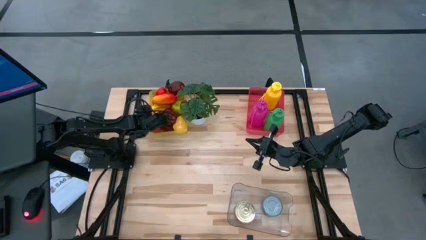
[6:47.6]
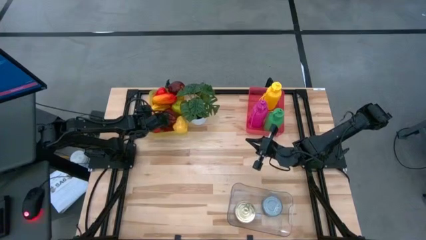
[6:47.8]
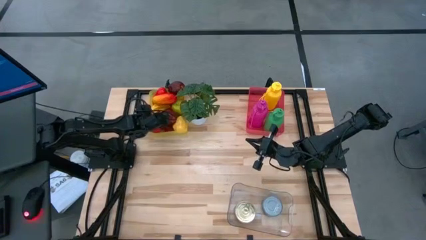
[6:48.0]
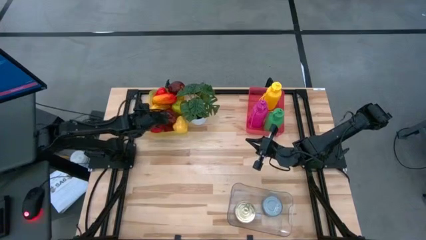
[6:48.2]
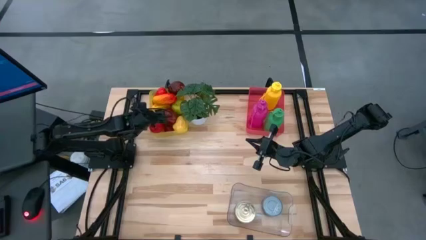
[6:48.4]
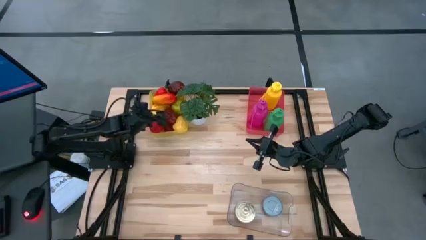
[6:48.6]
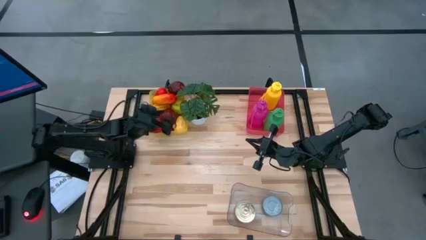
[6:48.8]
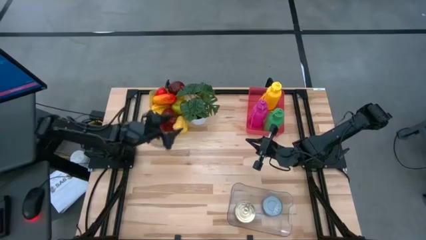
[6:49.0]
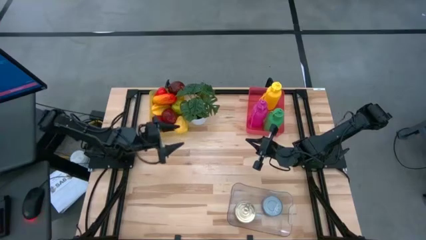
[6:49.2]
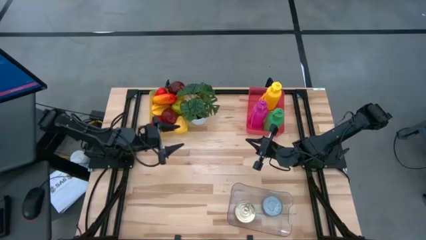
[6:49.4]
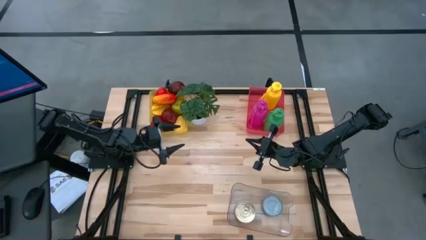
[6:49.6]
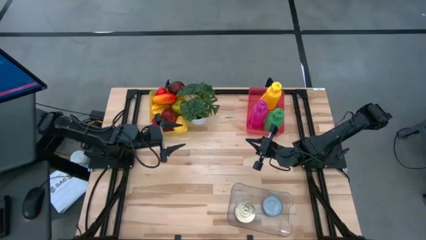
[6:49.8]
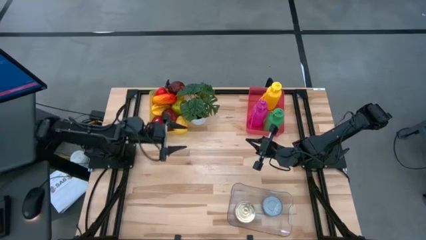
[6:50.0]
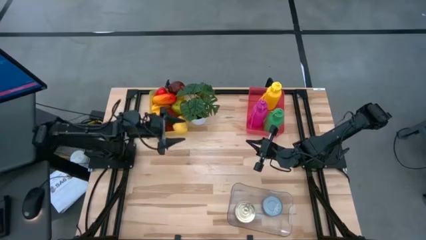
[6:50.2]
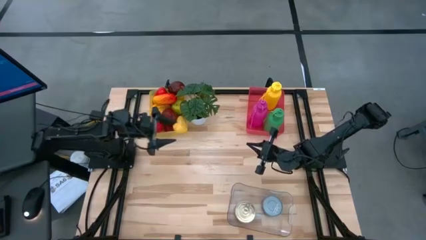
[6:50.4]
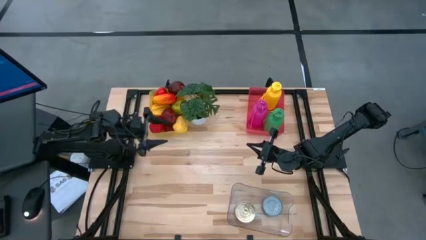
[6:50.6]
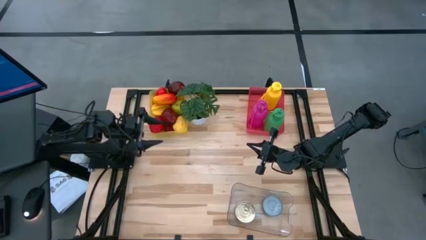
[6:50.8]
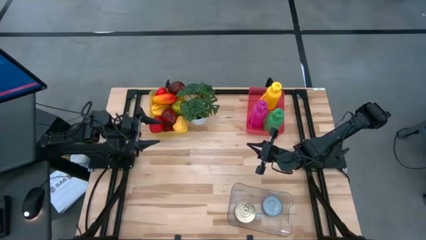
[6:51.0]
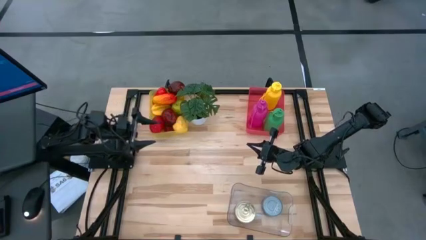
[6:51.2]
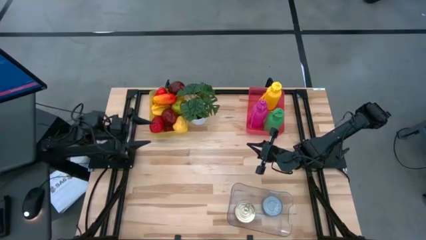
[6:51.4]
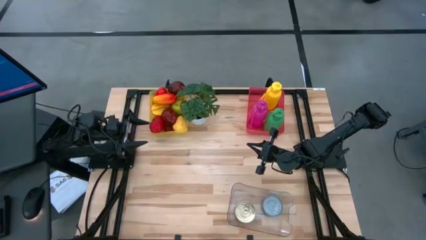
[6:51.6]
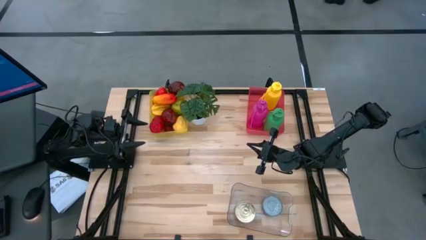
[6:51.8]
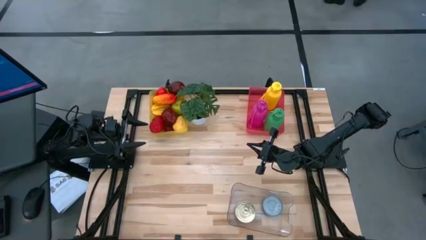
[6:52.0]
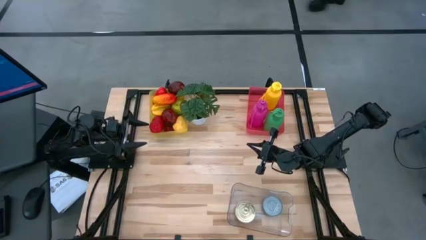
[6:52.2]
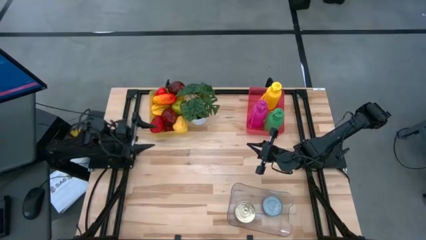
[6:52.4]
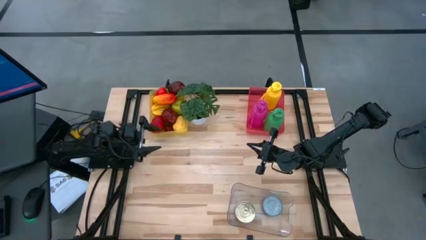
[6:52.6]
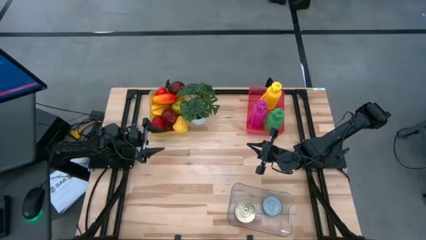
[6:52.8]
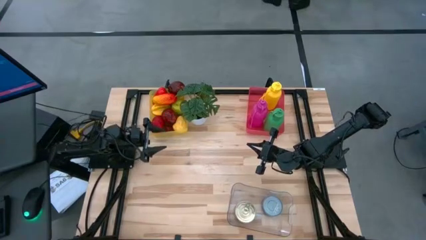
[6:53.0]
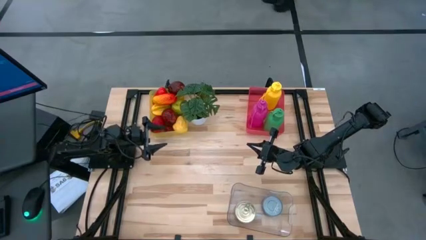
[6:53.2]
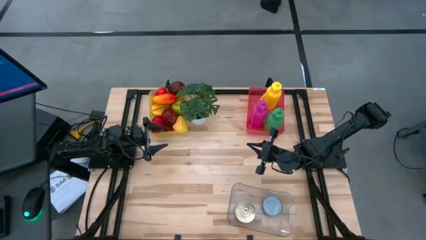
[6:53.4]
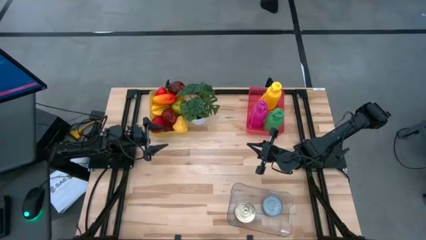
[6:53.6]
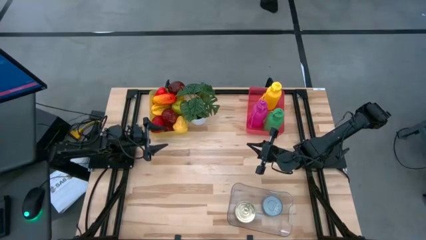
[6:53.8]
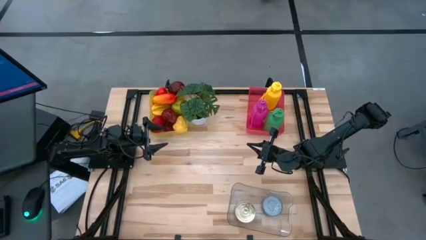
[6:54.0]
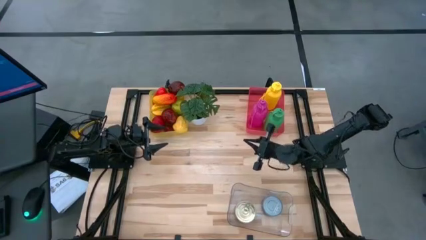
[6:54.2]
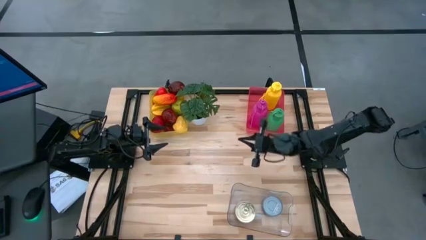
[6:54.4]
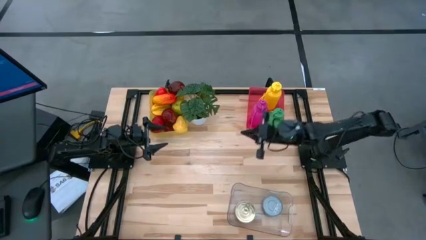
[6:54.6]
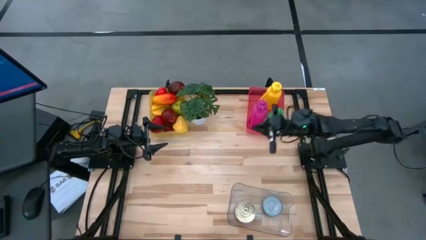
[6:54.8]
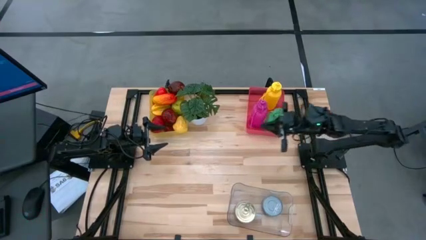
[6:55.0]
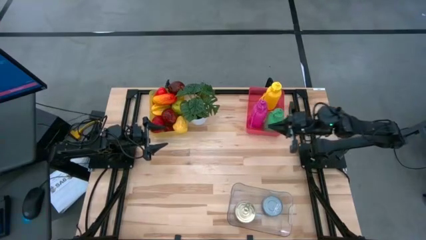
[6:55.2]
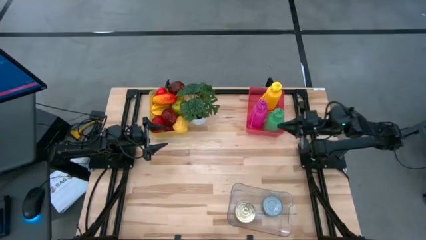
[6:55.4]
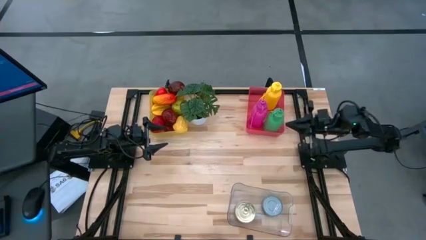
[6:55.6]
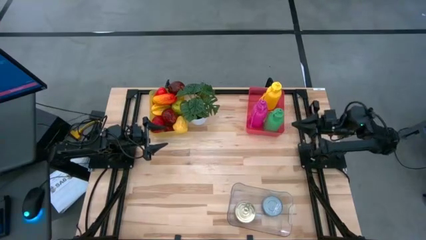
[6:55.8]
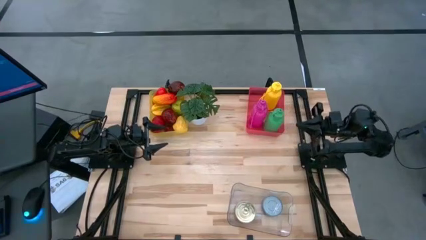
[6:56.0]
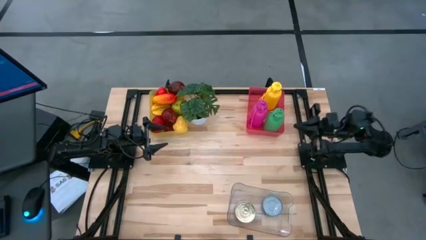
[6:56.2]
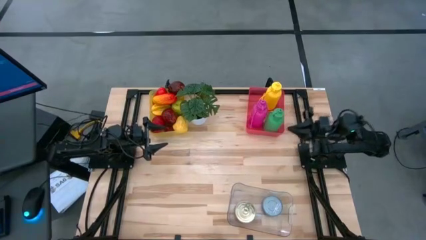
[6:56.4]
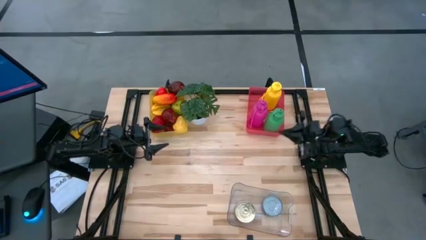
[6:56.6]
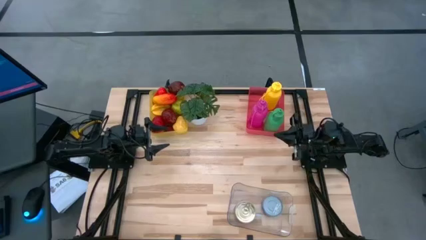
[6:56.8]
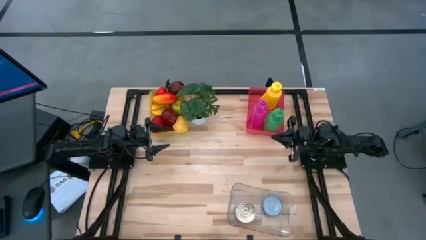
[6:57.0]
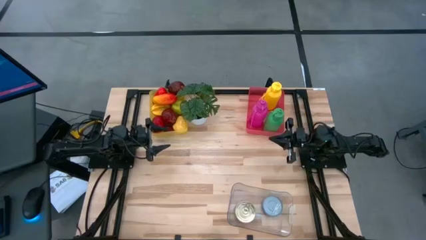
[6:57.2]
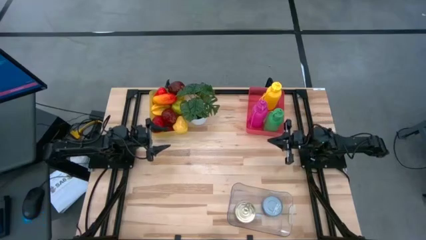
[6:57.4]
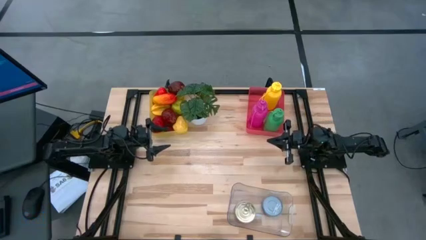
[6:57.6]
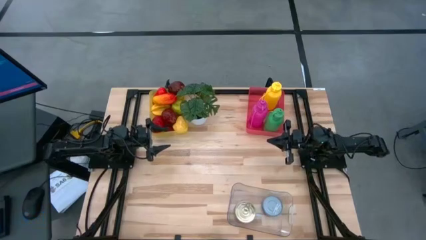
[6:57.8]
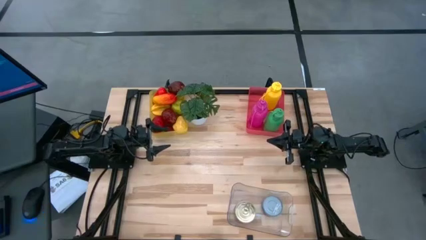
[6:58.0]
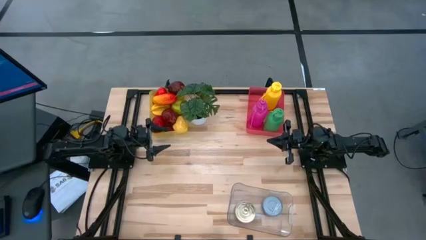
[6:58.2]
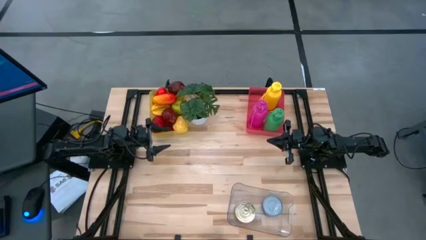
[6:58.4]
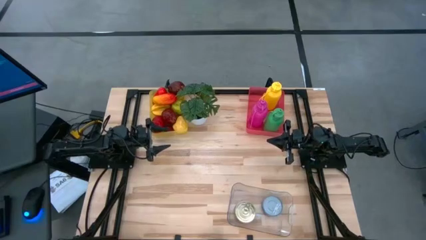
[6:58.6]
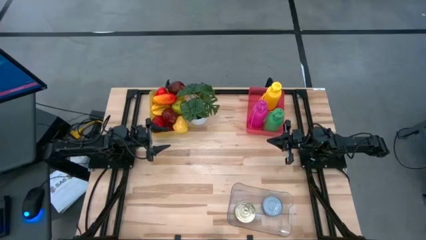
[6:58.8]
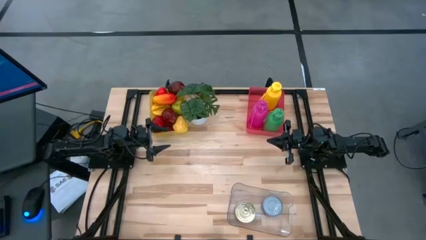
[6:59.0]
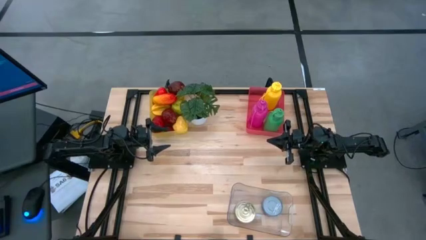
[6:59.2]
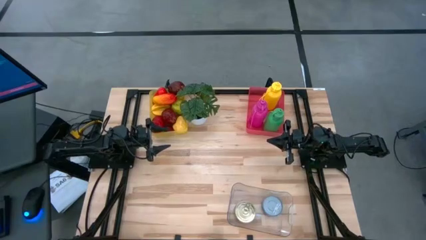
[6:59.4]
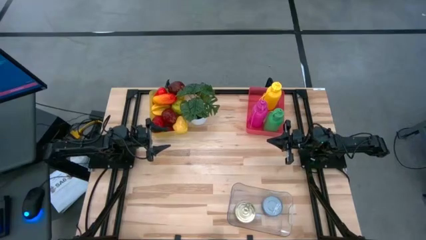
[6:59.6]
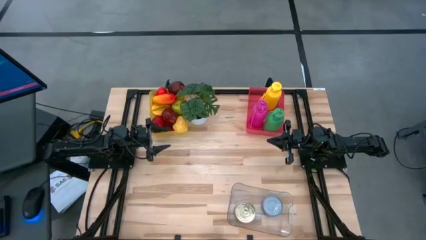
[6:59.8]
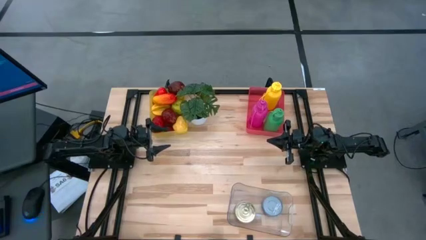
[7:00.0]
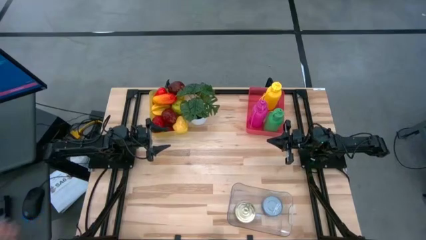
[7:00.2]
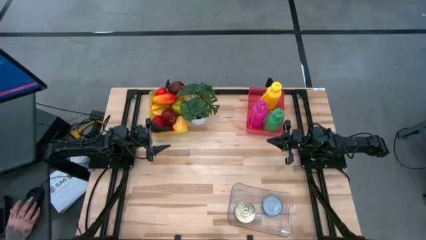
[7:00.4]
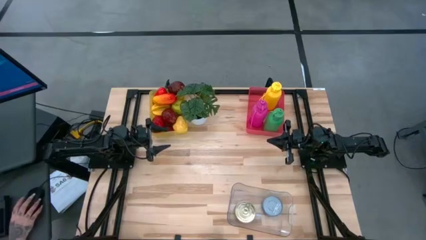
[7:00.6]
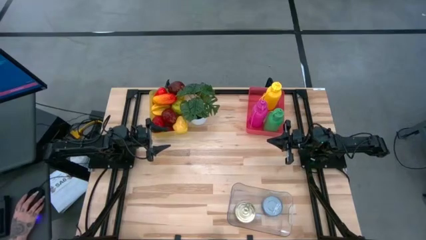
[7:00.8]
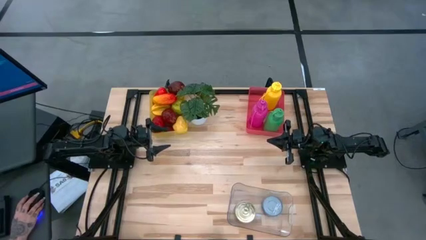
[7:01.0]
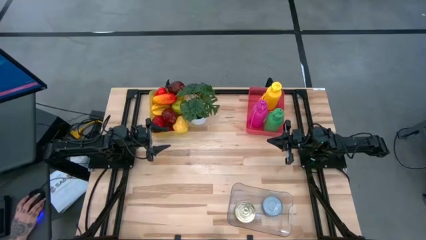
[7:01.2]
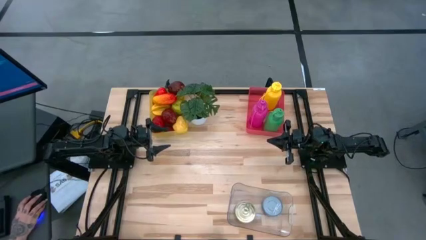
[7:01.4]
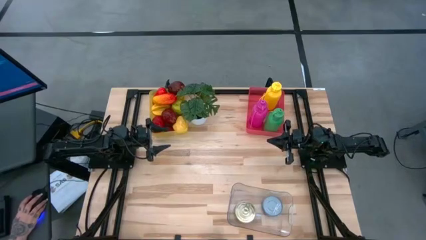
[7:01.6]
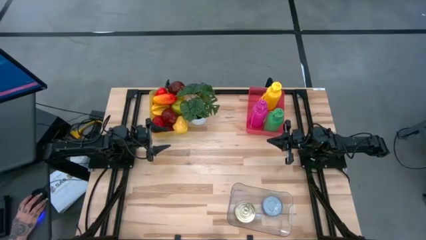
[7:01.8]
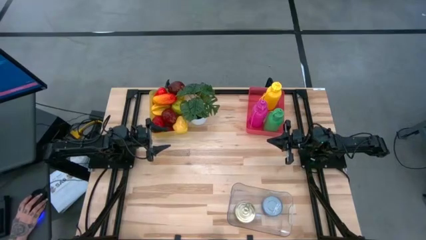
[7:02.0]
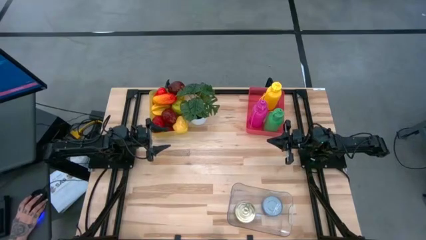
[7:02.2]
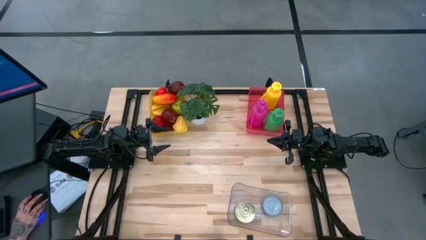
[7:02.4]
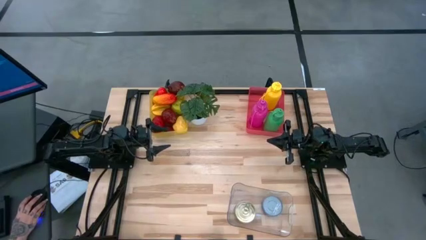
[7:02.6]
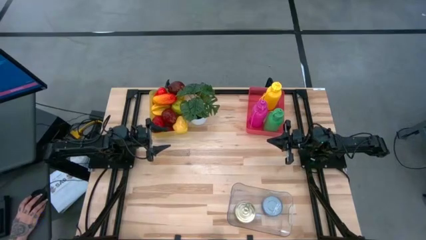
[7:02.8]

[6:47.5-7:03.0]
Task: Pick & Place Food Item
Return to Home Position
